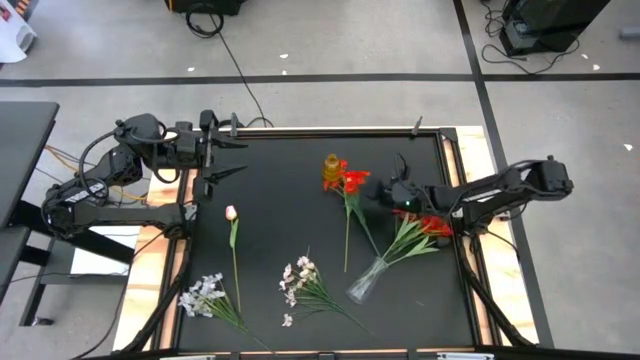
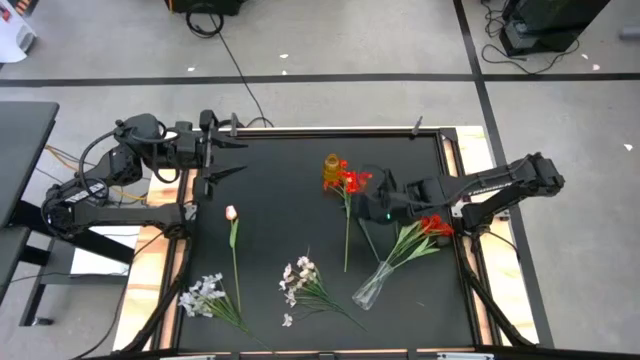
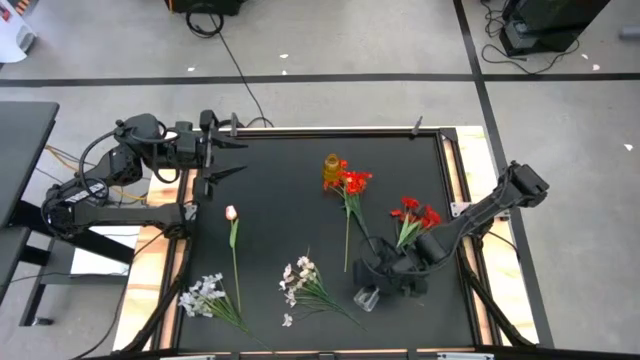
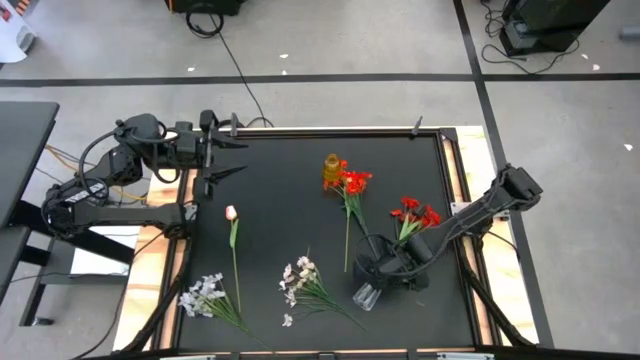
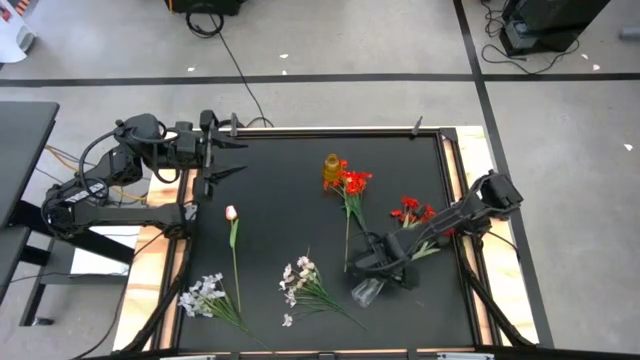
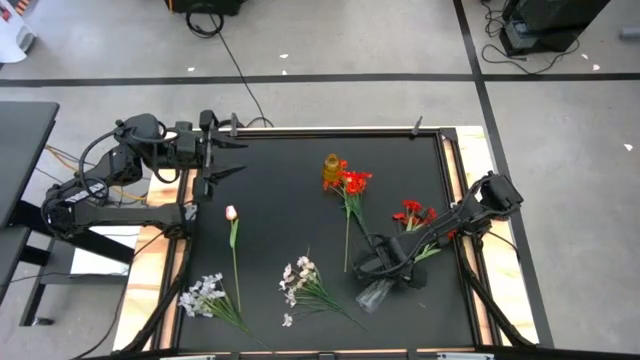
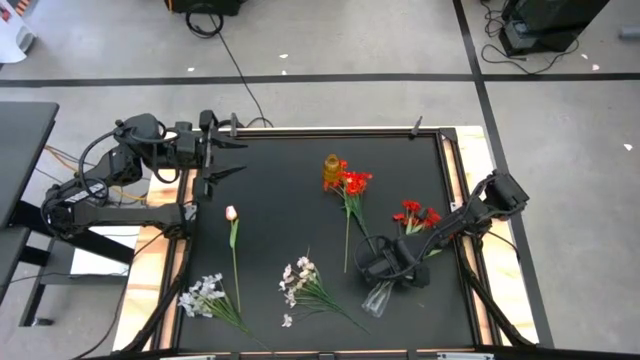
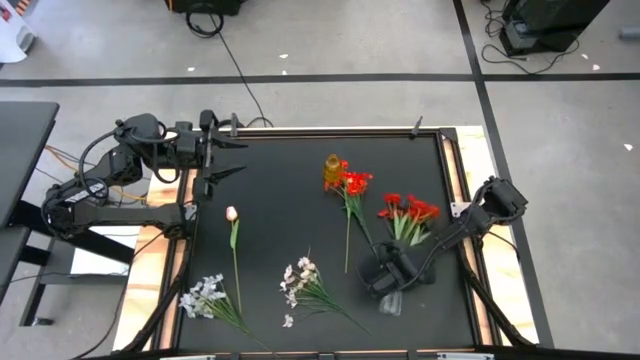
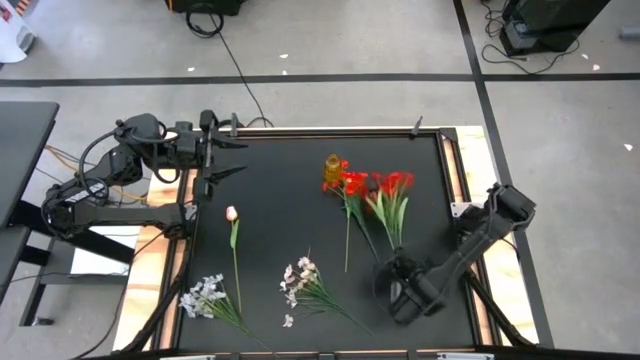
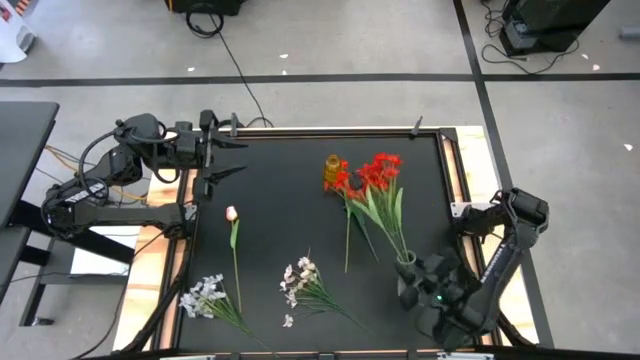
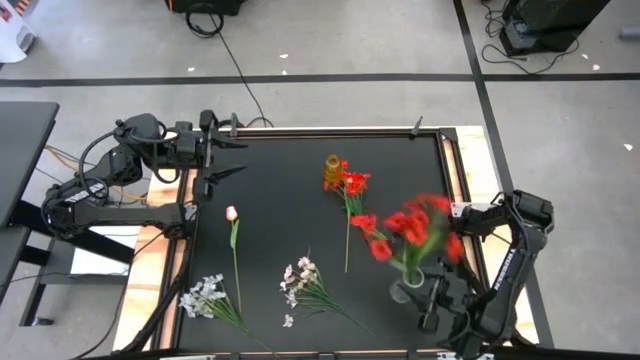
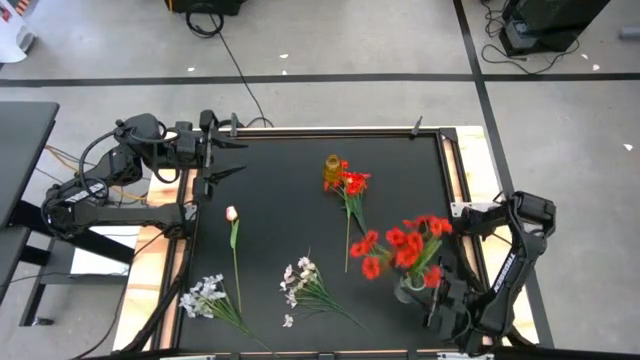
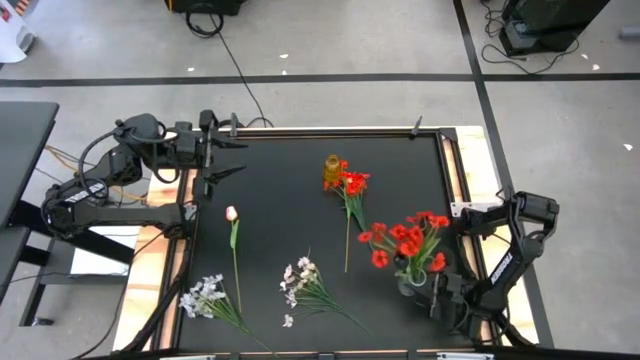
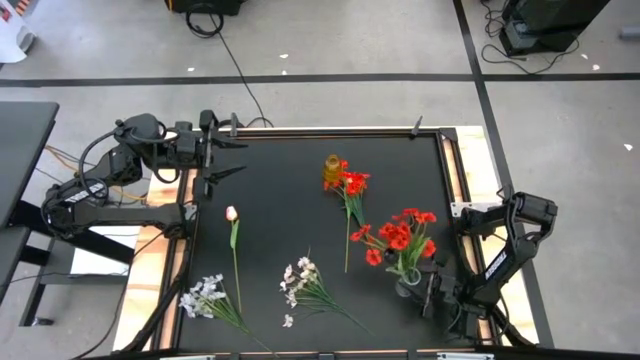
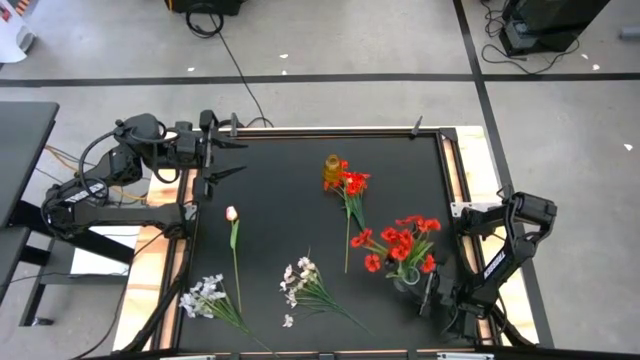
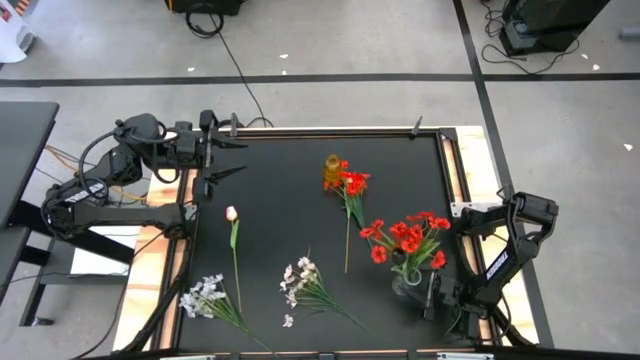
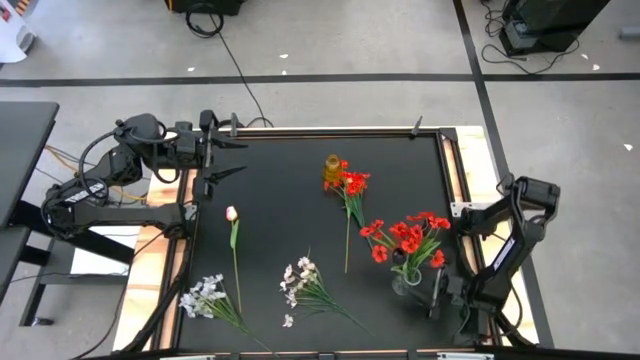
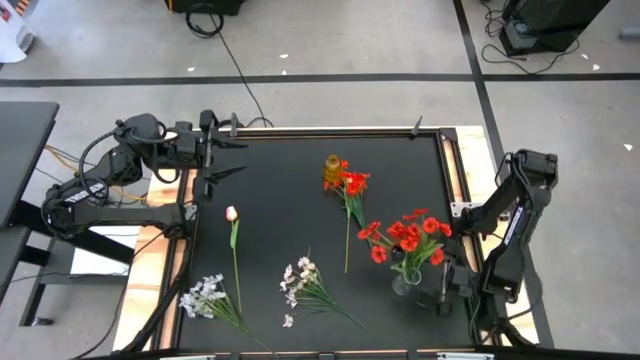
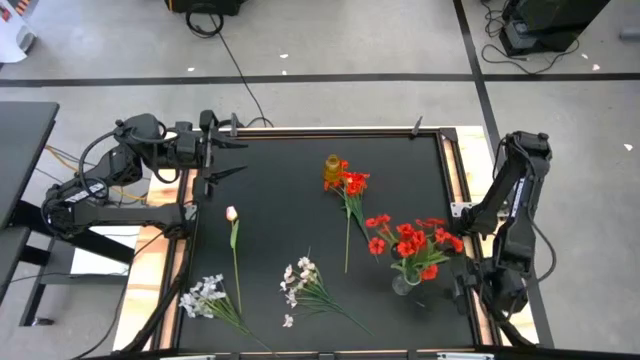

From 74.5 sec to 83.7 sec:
Task: Sort flowers into vase by color
Adjust the transparent vase

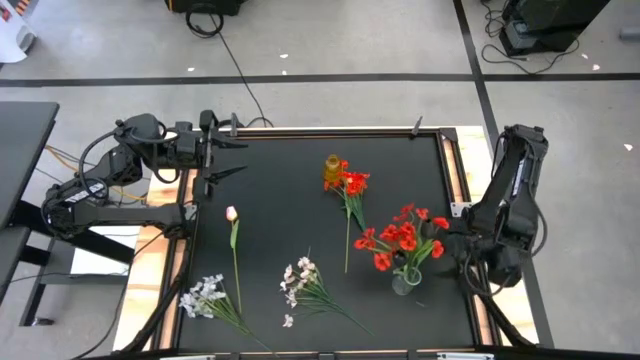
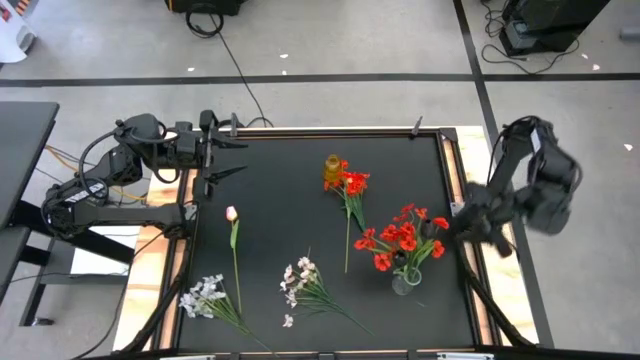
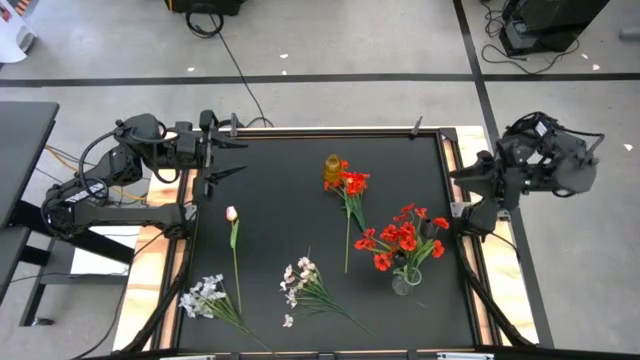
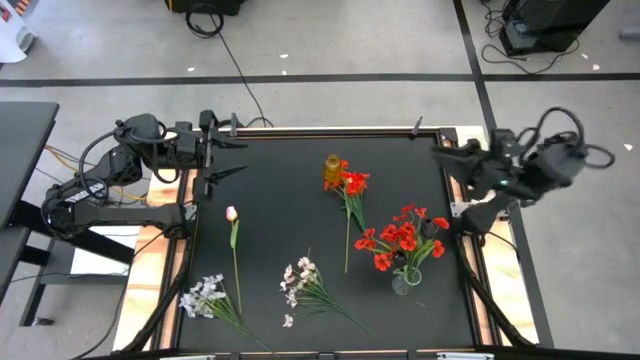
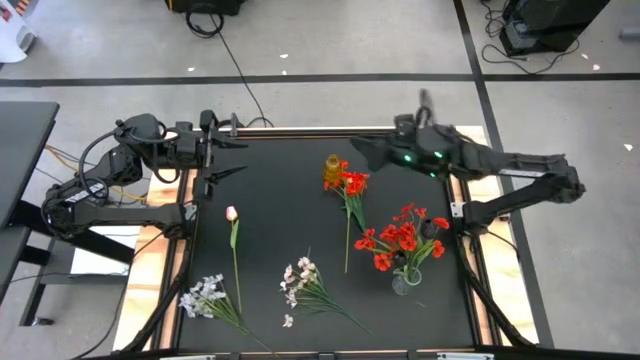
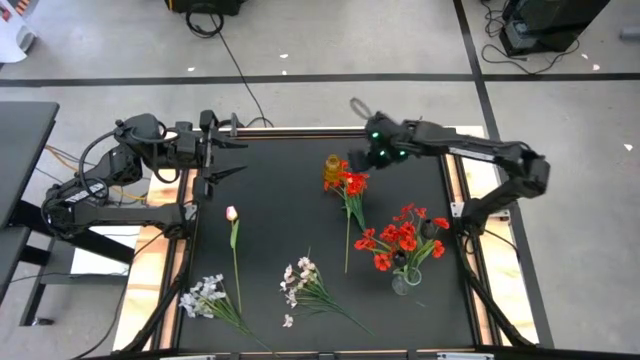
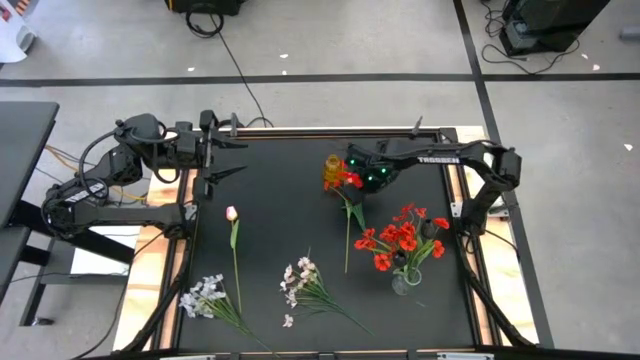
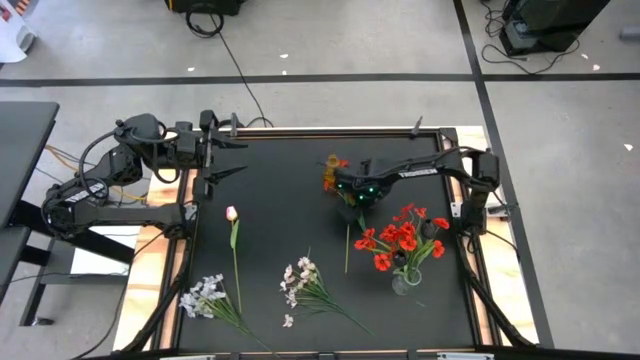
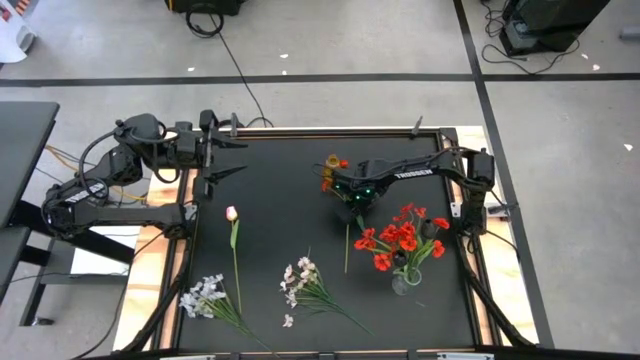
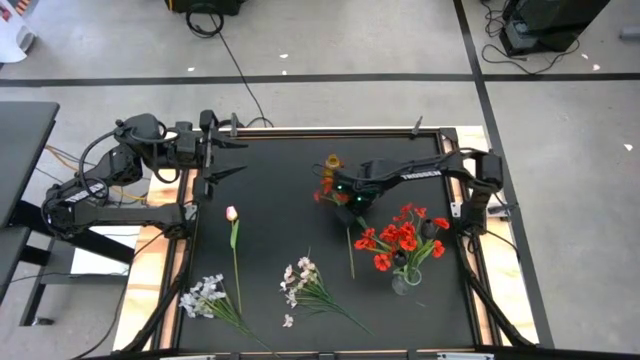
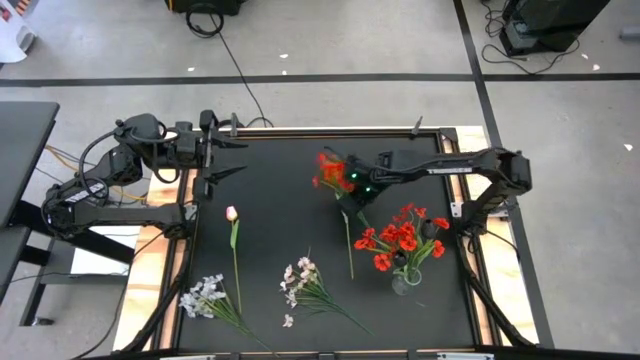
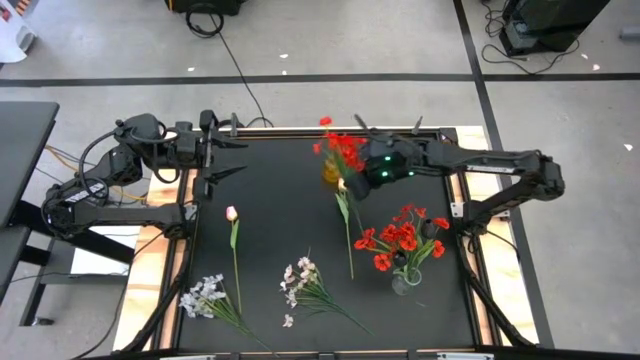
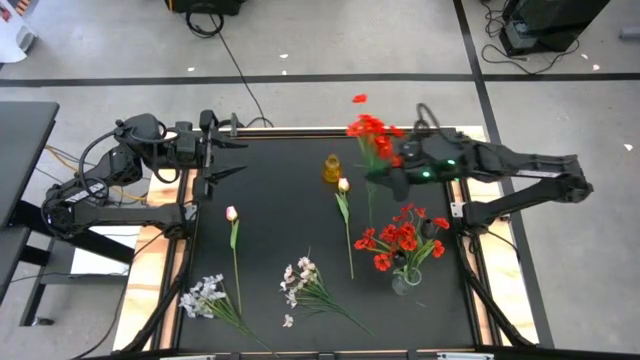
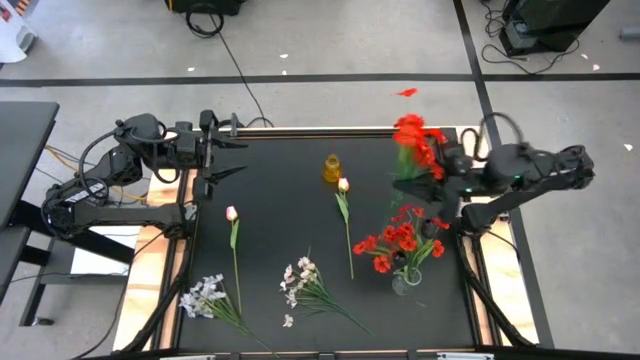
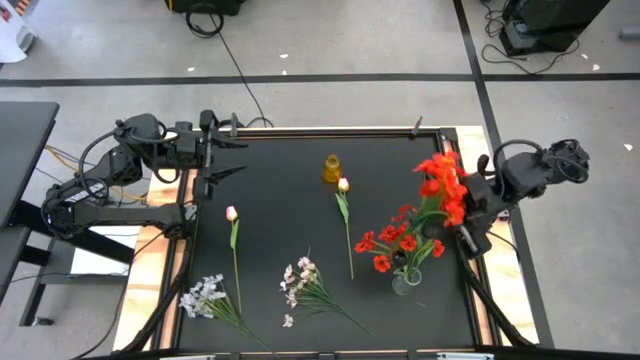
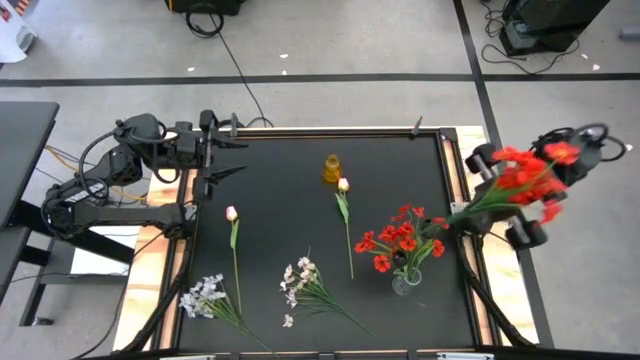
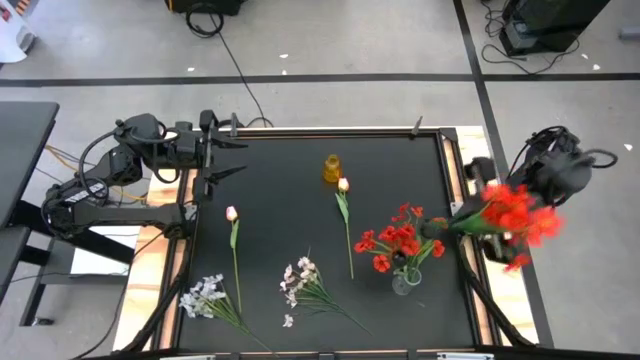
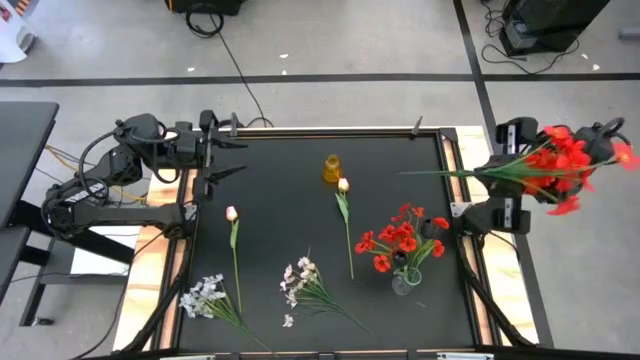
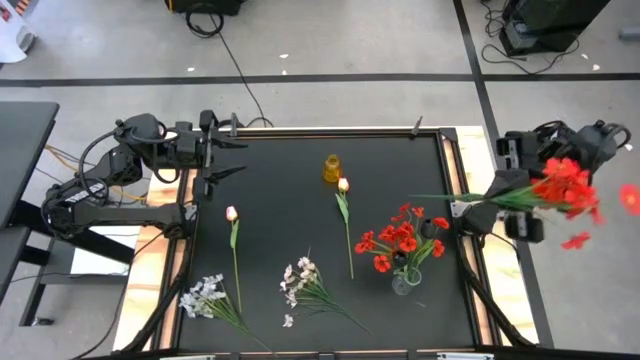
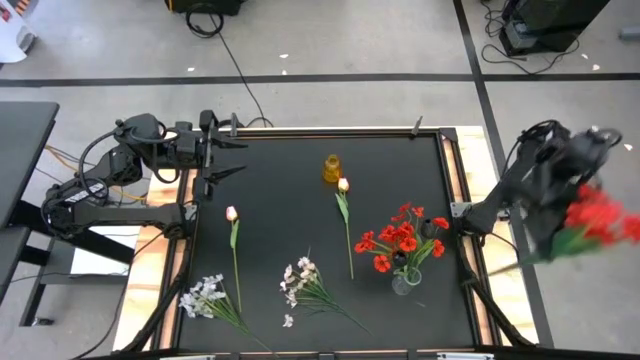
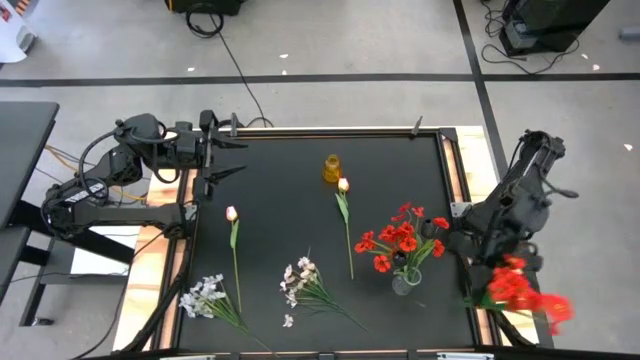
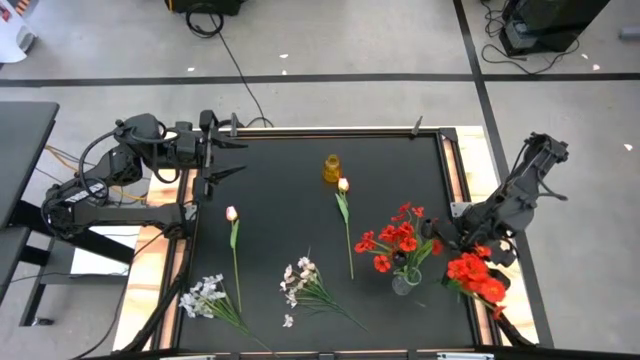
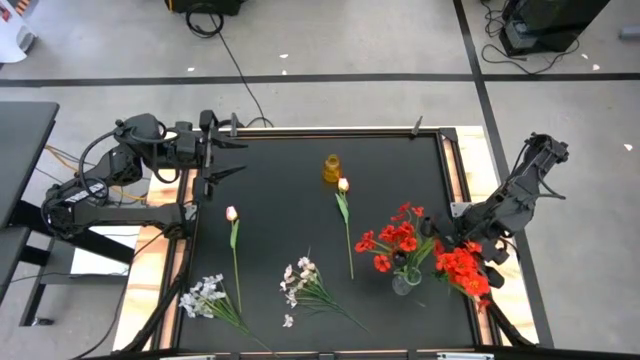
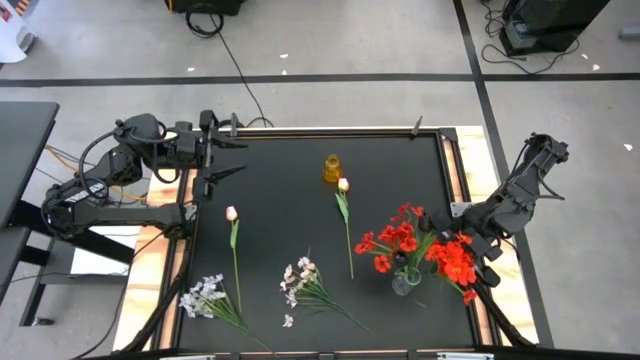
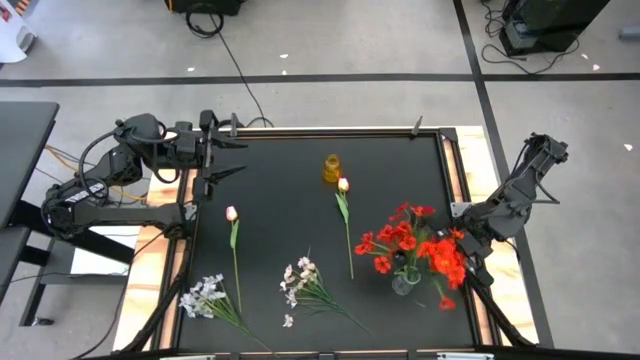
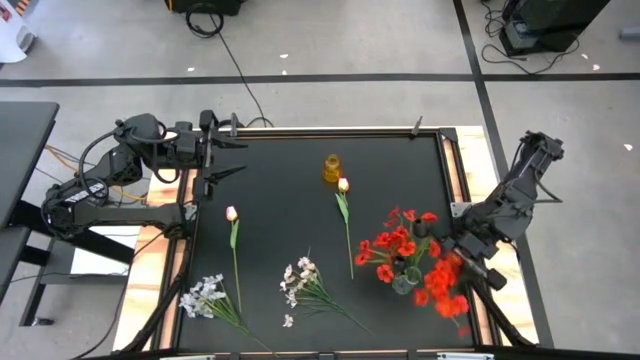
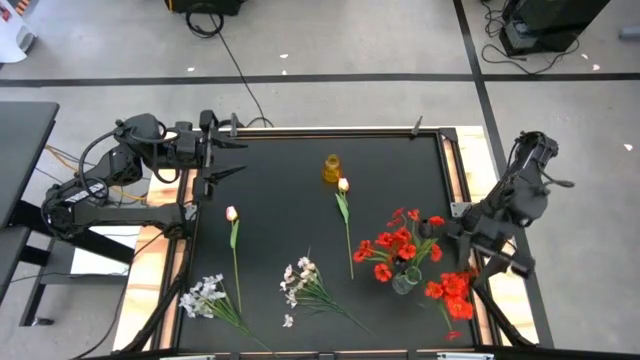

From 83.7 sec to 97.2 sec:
Put the red flowers into the transparent vase
